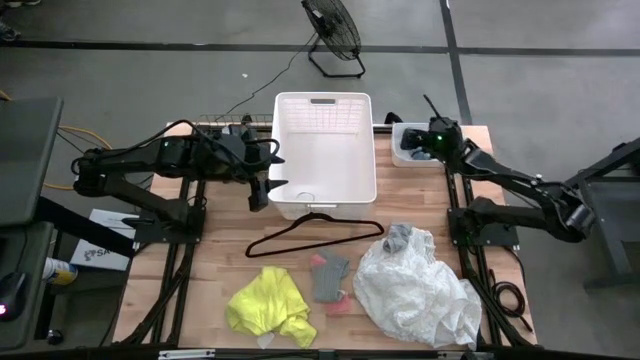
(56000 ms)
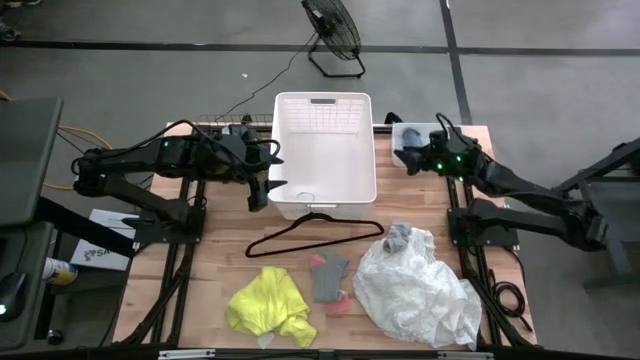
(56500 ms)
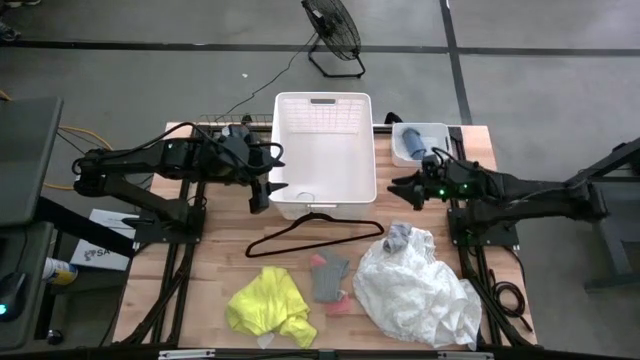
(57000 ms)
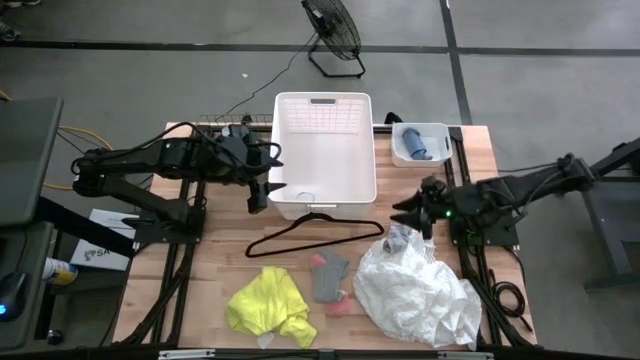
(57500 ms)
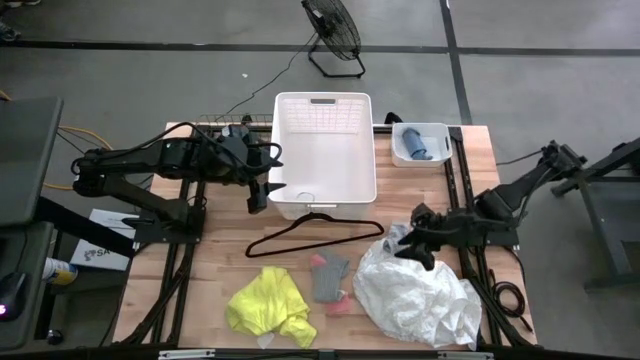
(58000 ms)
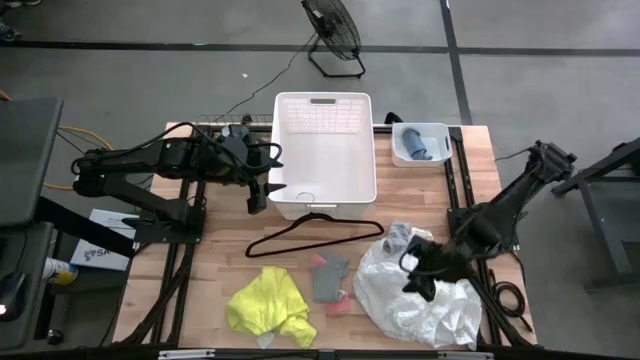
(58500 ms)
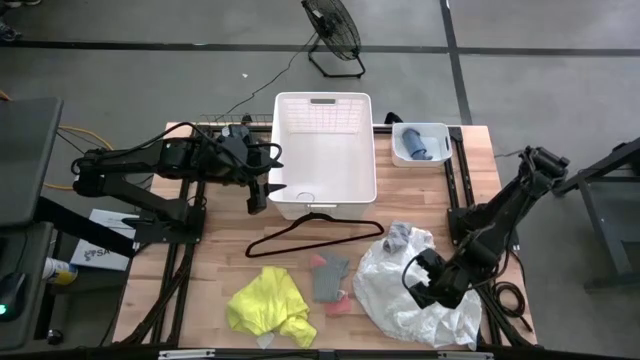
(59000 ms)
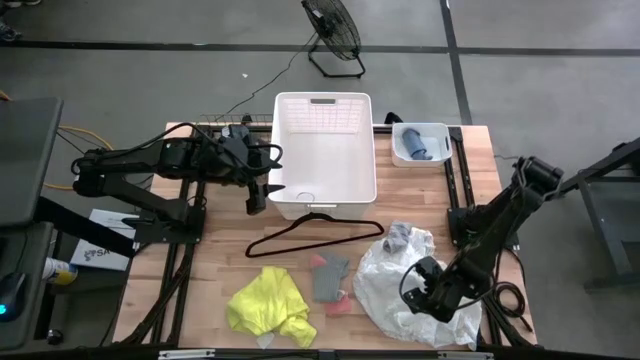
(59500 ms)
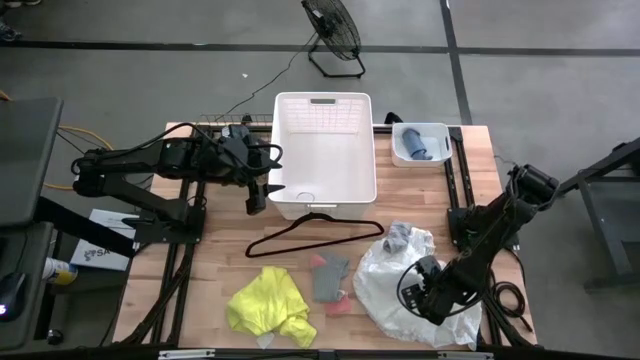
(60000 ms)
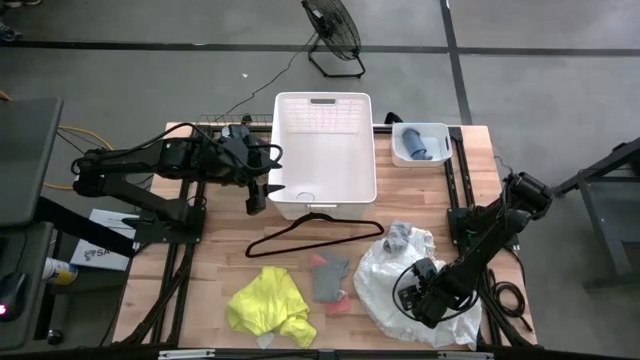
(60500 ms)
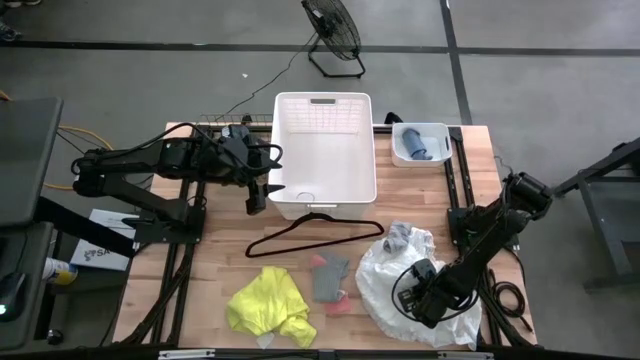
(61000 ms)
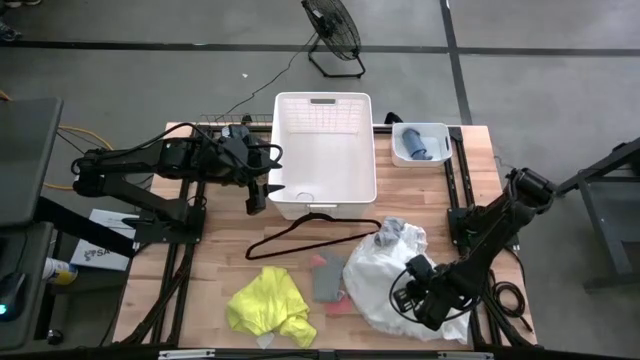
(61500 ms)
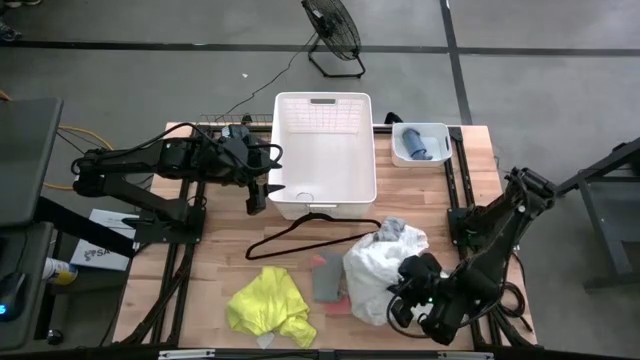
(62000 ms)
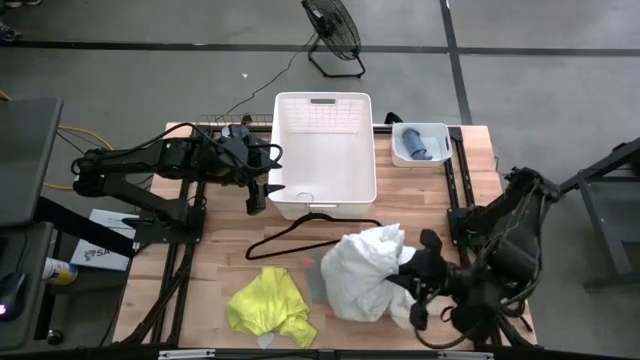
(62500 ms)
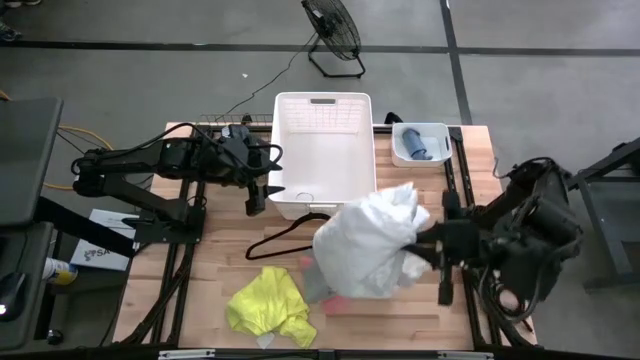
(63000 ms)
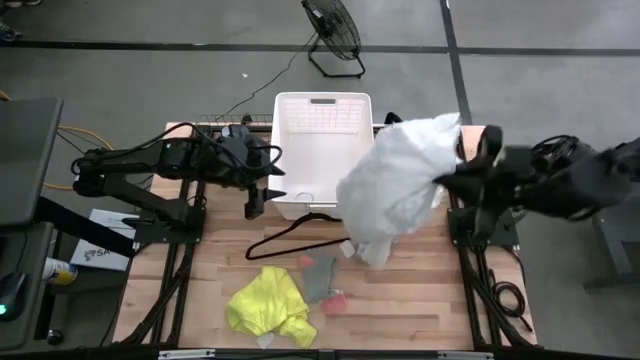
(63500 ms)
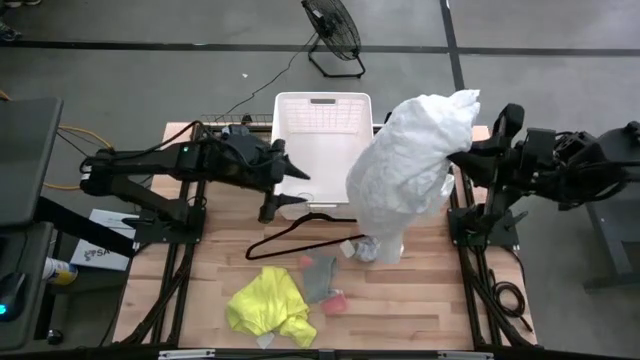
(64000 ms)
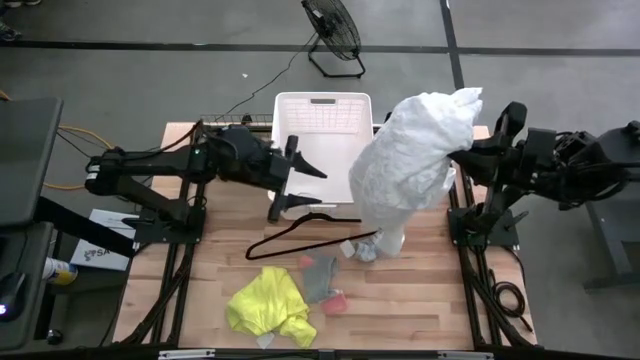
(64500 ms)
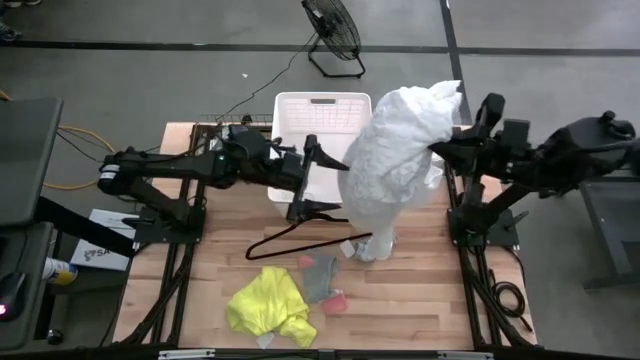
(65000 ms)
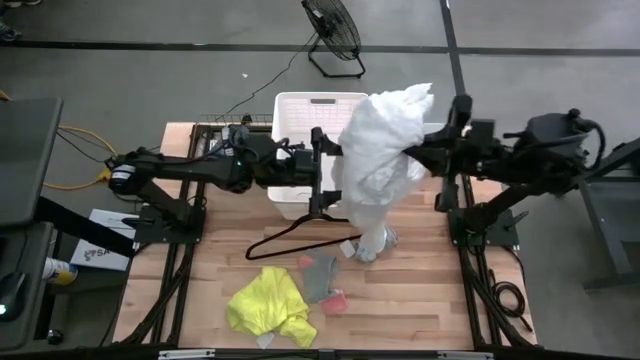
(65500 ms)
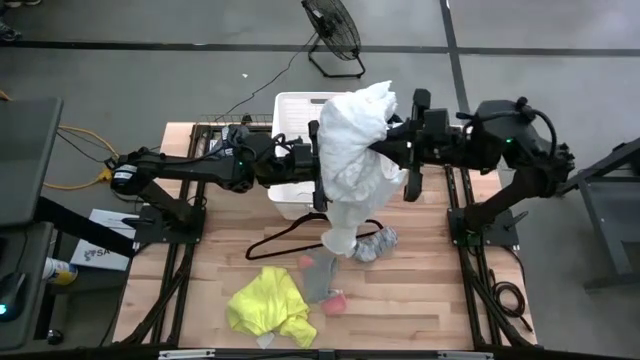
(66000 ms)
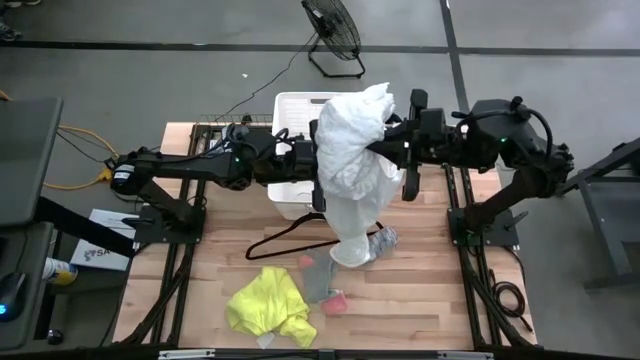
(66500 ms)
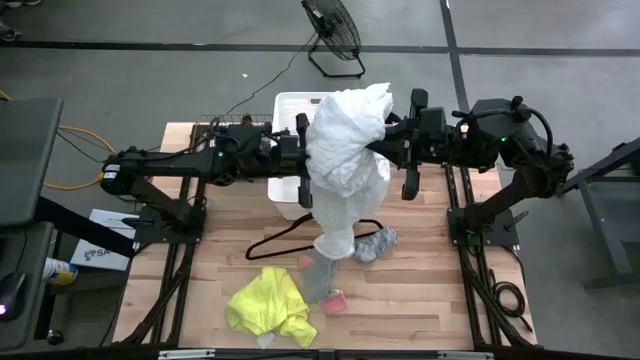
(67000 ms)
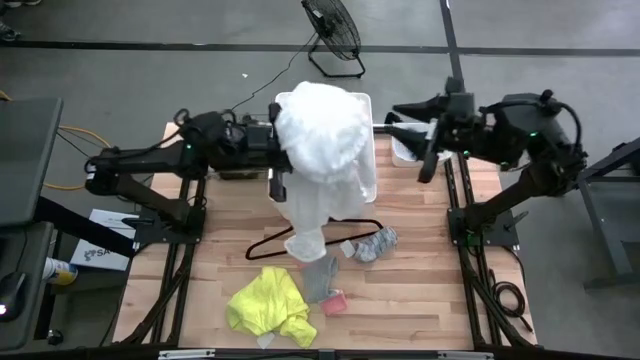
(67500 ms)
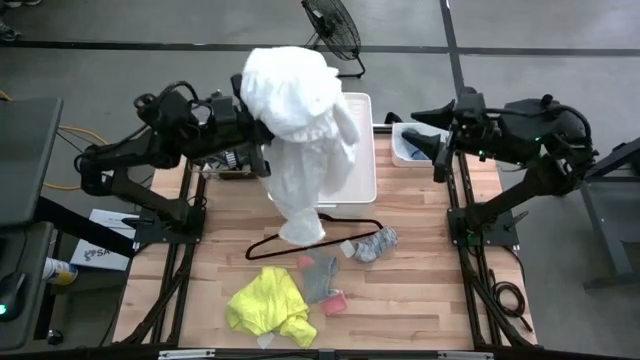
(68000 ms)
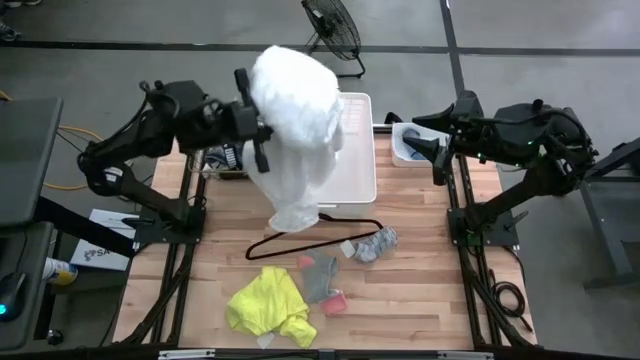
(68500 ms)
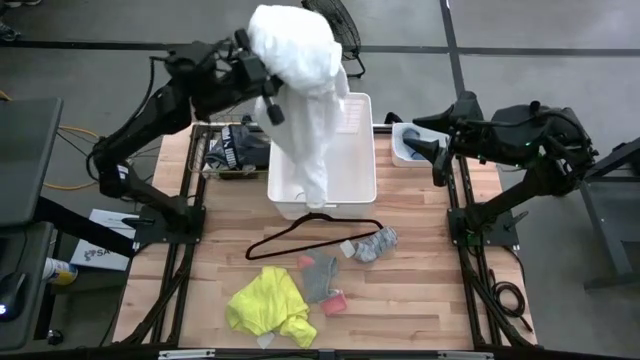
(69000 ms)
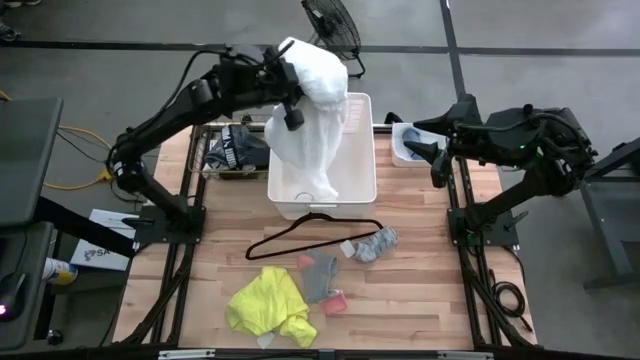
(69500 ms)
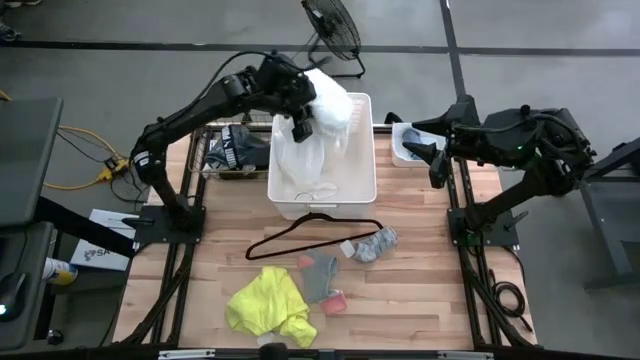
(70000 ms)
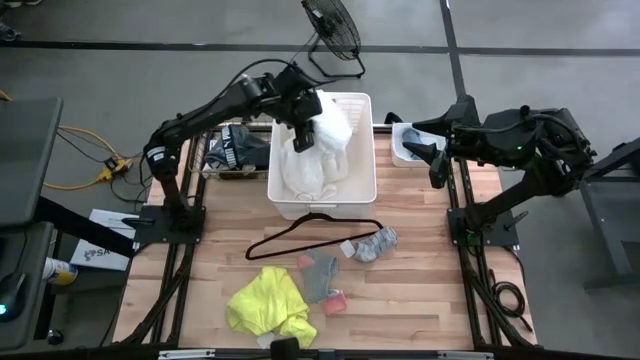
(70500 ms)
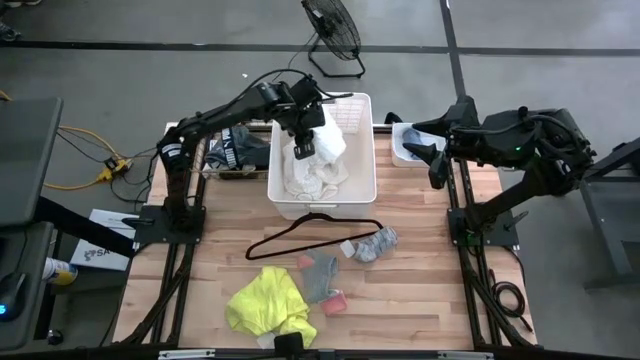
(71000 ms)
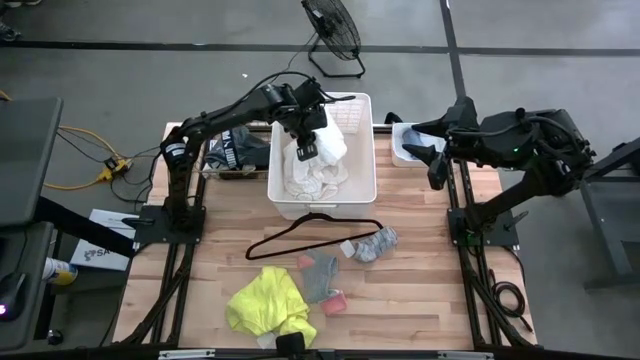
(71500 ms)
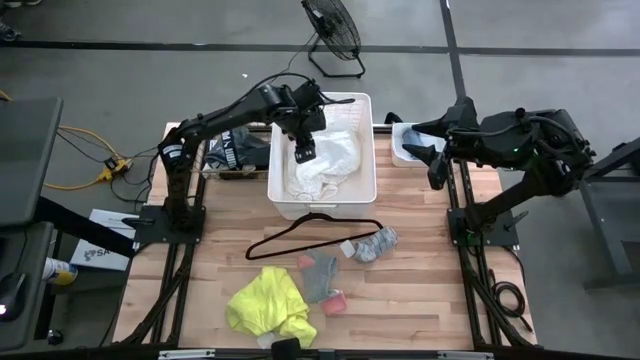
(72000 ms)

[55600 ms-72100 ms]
Task: Pick & Place Cloths
Put the white dress into the large white bin

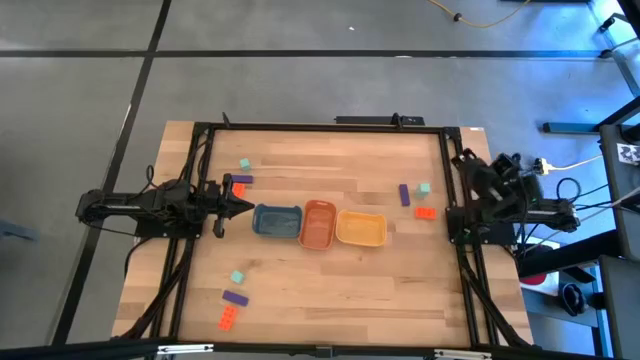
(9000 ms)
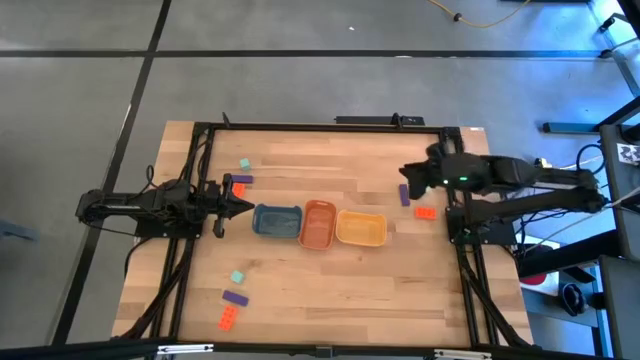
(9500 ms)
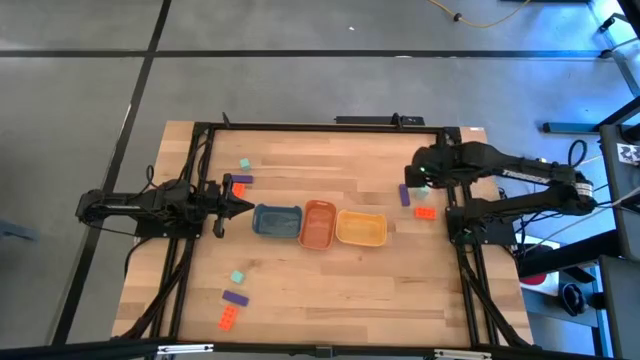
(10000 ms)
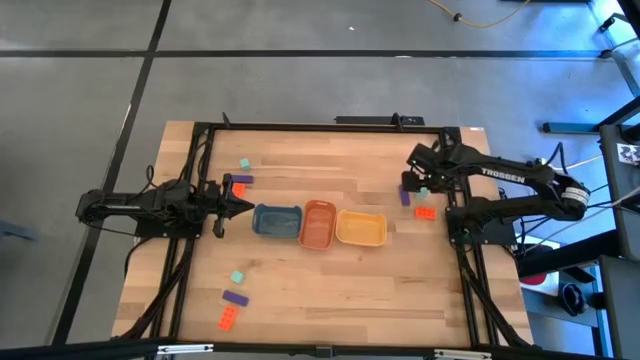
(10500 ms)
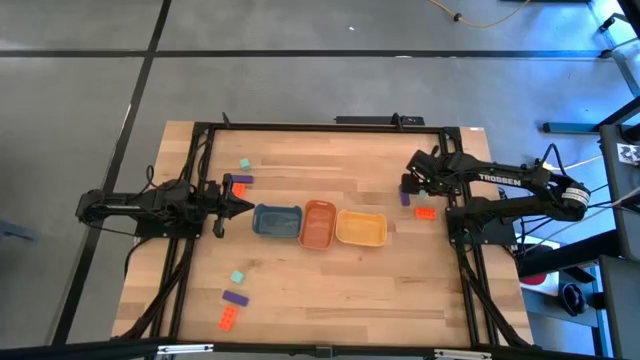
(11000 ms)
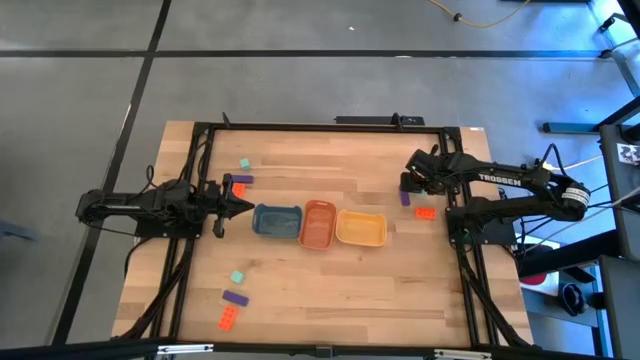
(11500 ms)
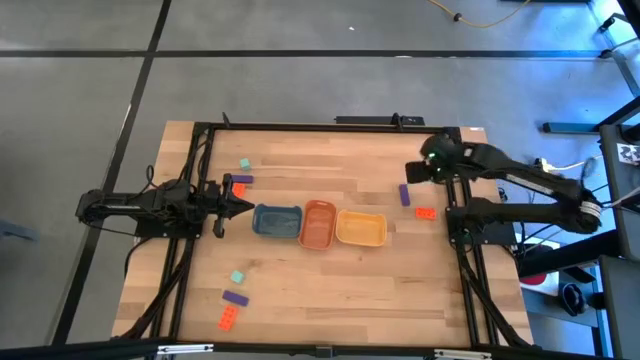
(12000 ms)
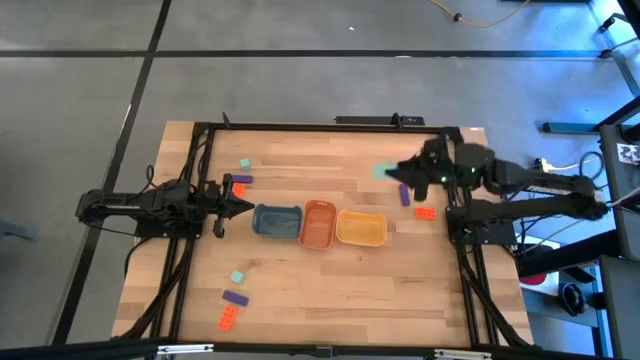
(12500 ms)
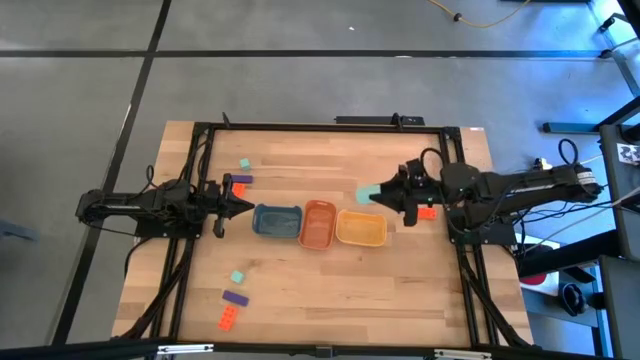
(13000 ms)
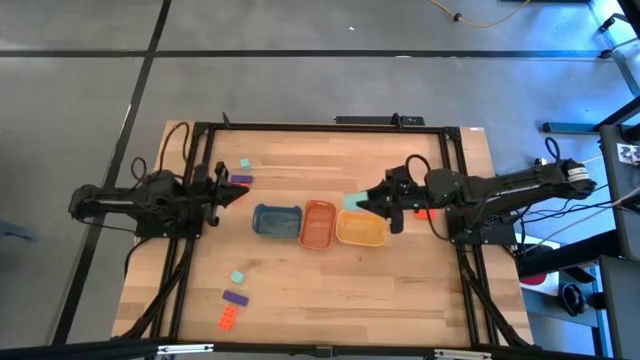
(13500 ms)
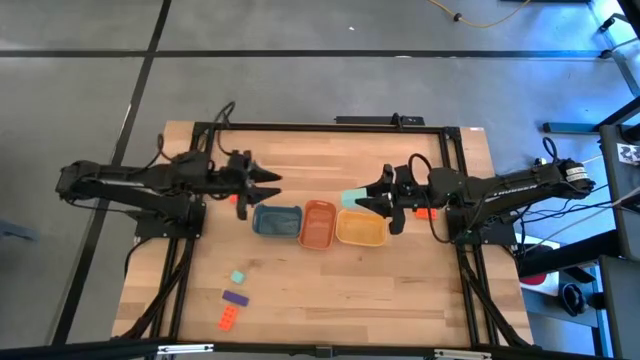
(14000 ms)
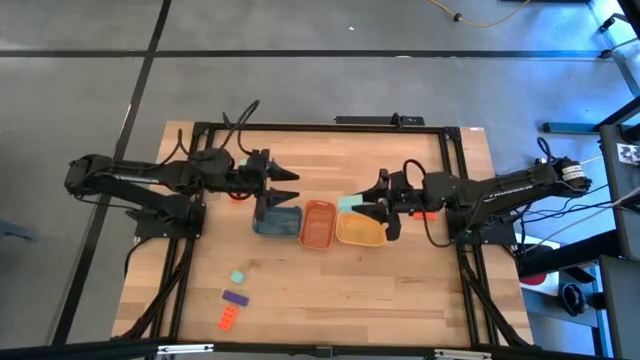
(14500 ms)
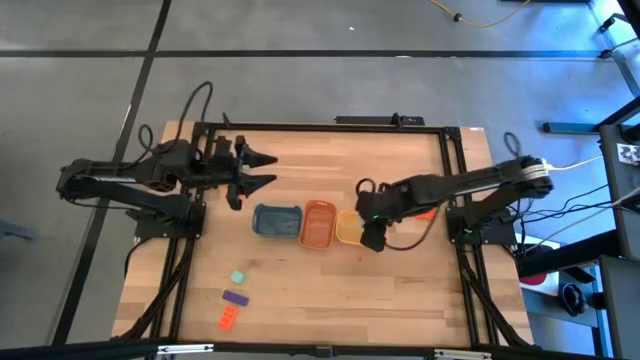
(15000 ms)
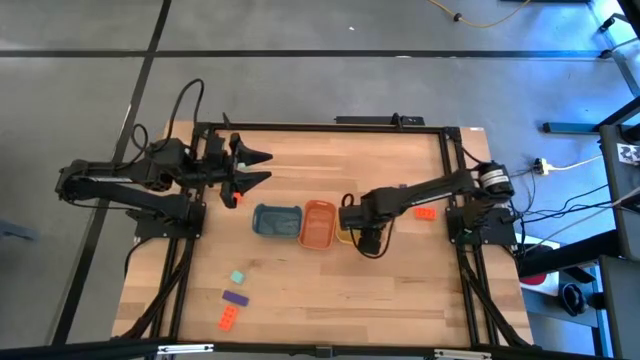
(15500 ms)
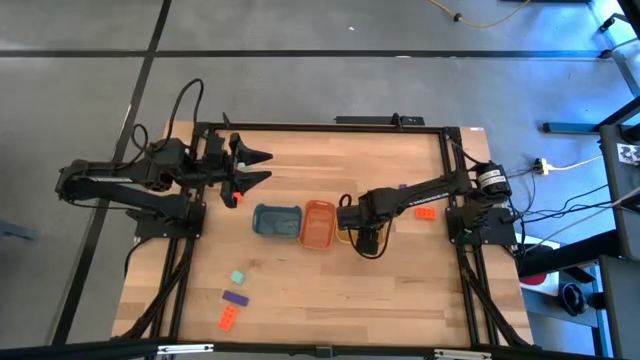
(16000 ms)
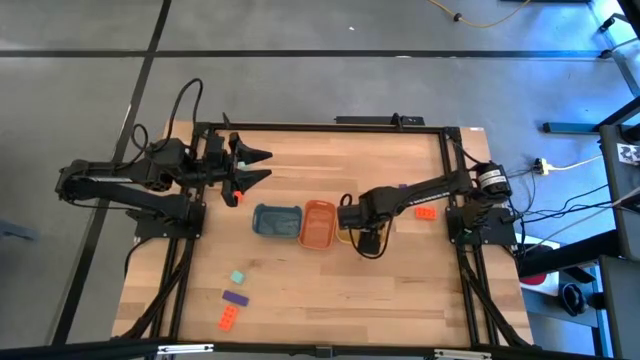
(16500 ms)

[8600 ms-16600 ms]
Task: Sort & place blocks by color
Put the top right light blue rectangular block into the yellow bin
